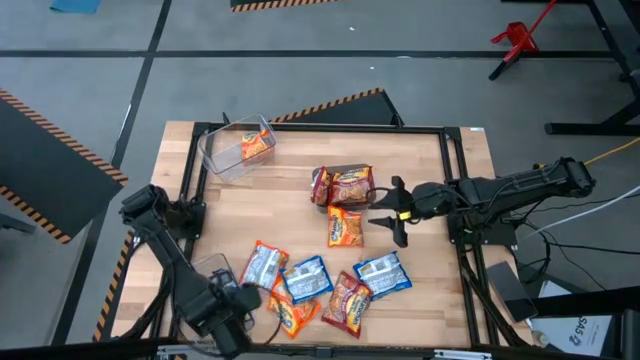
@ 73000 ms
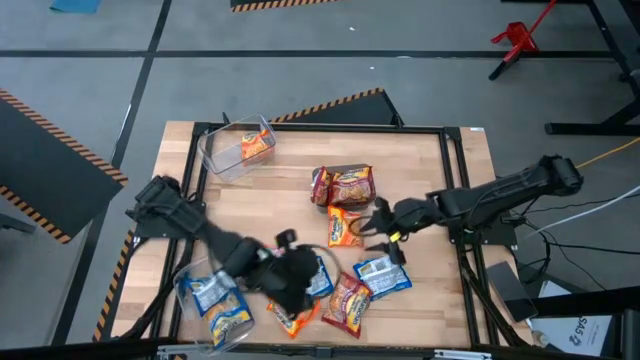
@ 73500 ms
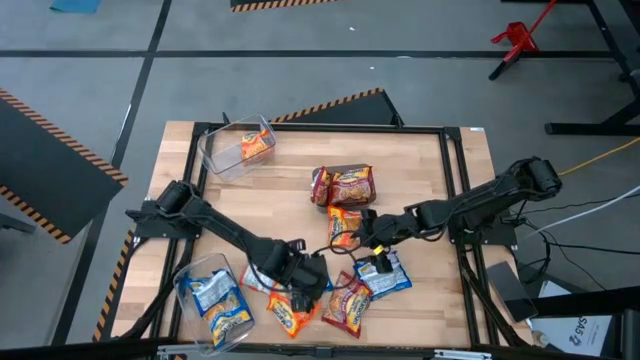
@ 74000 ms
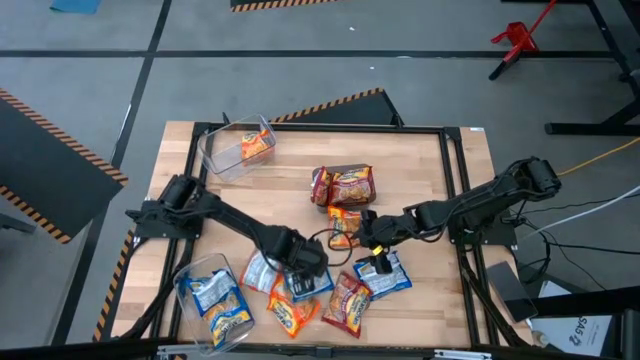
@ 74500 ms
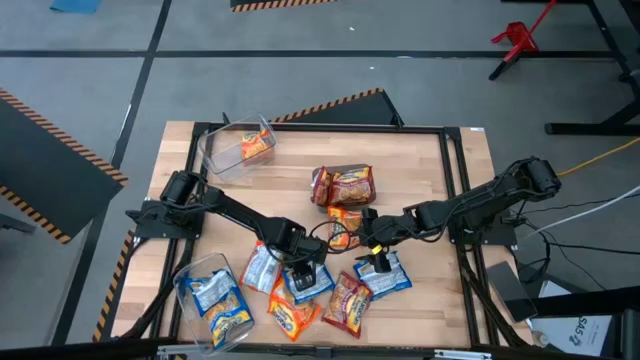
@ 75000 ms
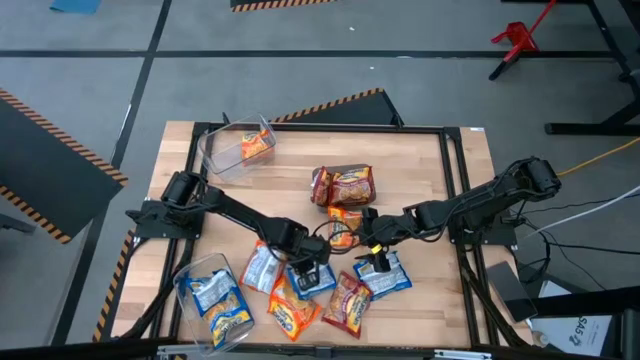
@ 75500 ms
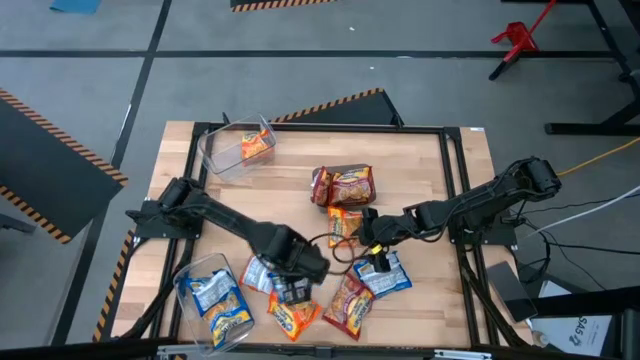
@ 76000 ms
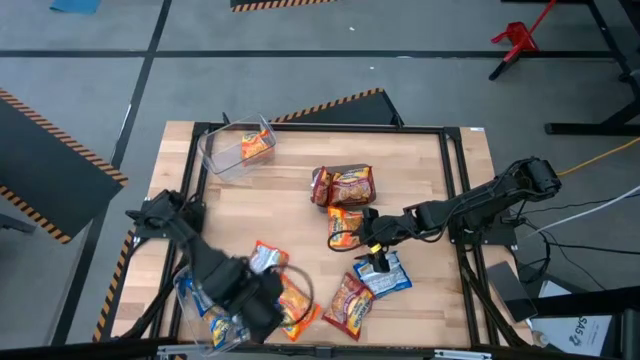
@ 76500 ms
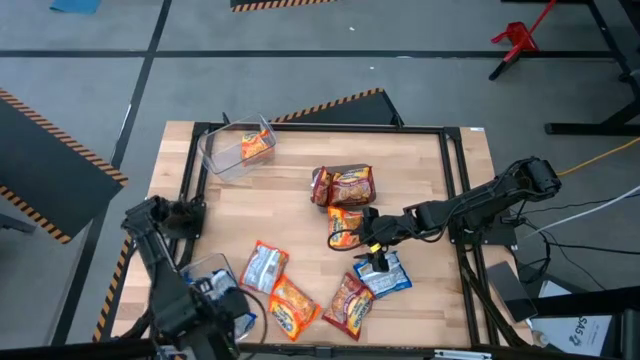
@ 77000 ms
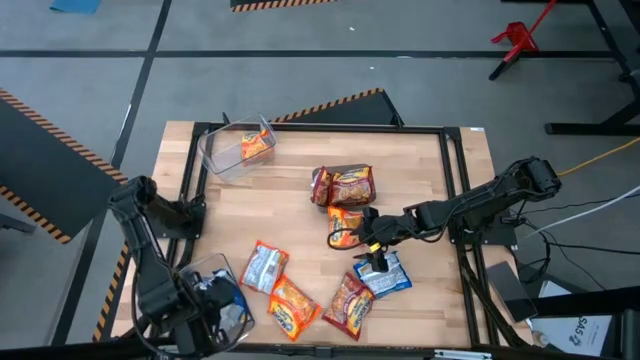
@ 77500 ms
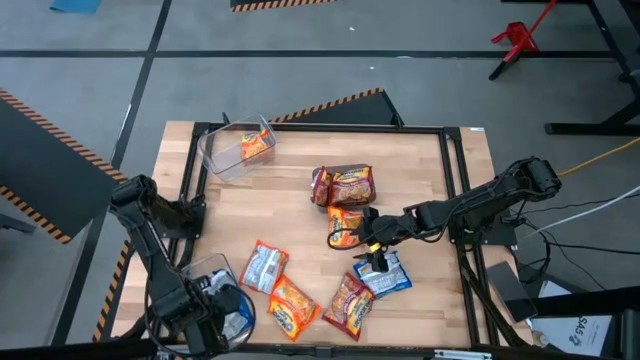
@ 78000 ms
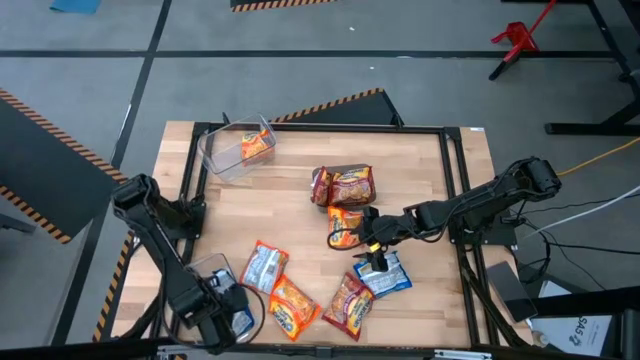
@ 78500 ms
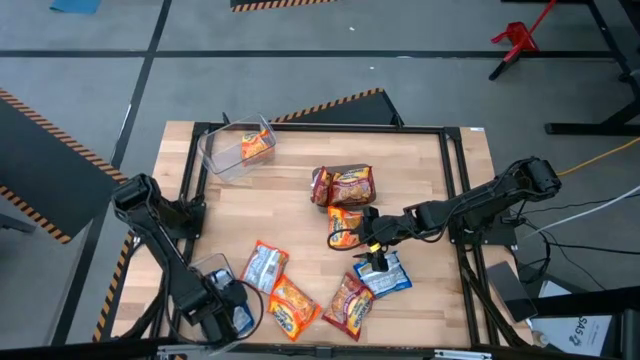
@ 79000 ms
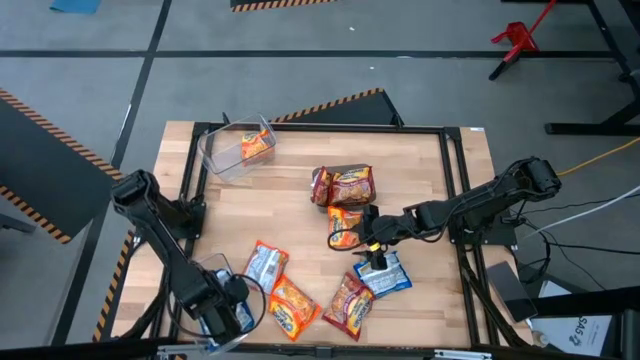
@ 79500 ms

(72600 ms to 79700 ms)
Task: Sort Maruchan noodles
Put the blue noodle pack into the bottom transparent bin

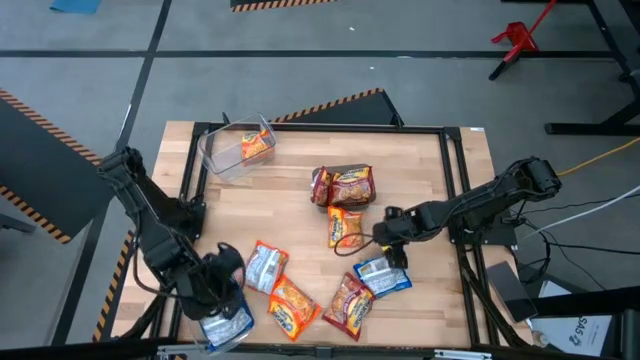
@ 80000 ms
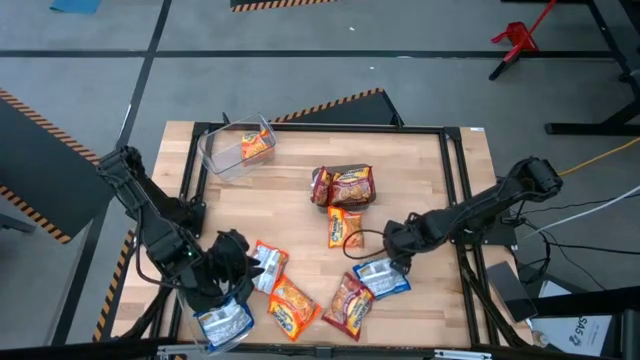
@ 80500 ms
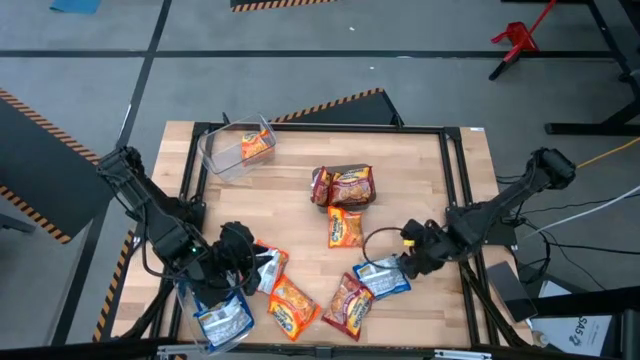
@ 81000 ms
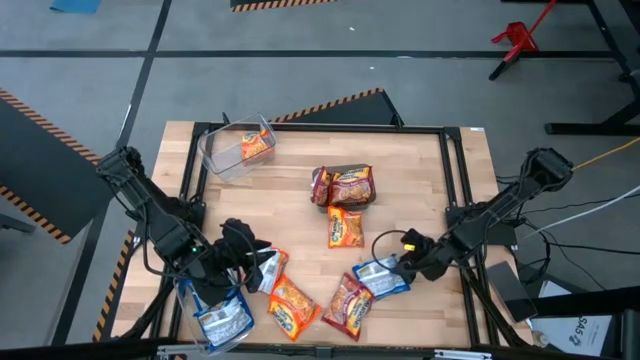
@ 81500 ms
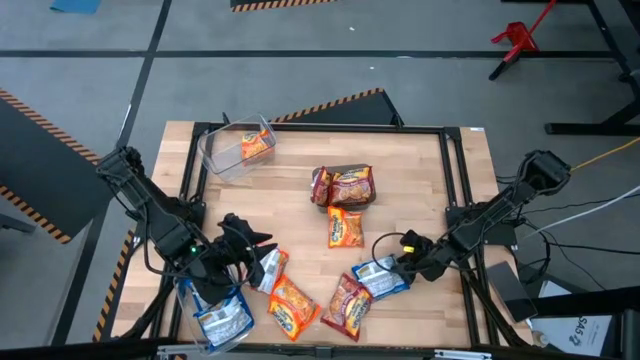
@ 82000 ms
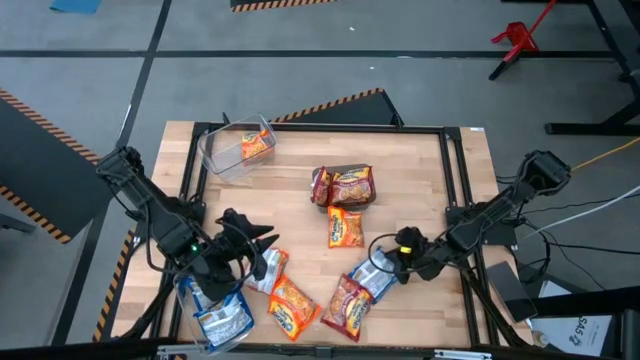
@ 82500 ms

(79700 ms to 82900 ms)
Put the blue noodle pack into the bottom transparent bin

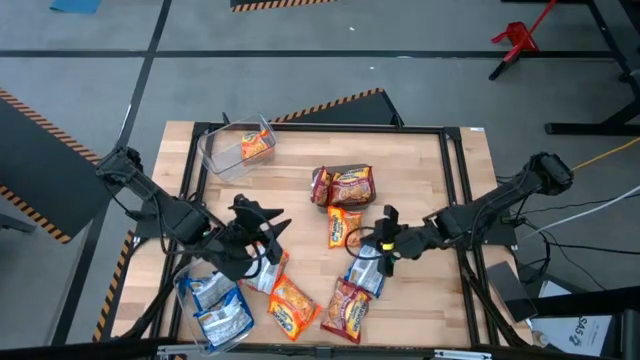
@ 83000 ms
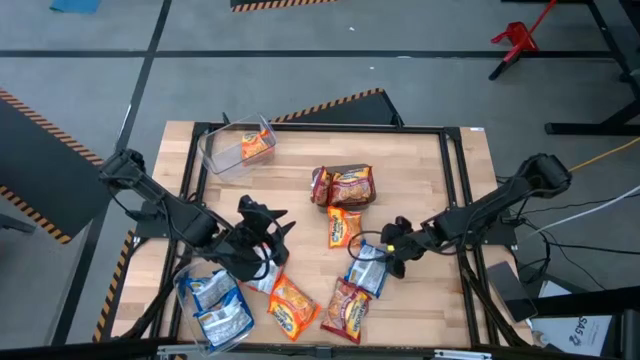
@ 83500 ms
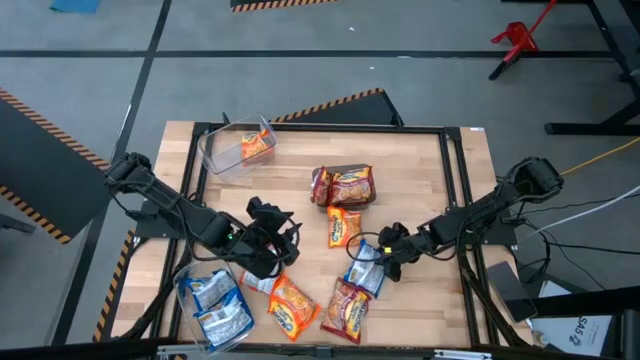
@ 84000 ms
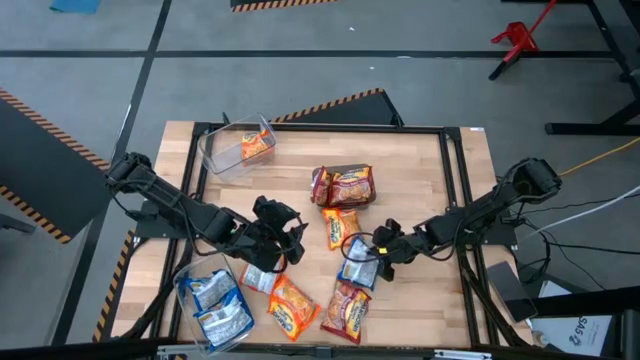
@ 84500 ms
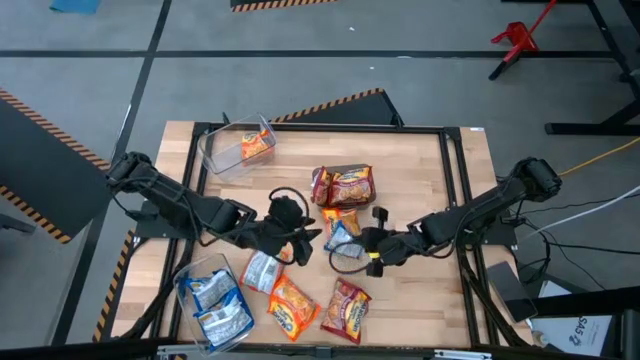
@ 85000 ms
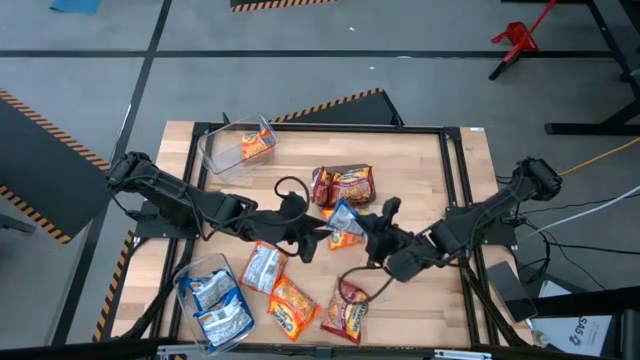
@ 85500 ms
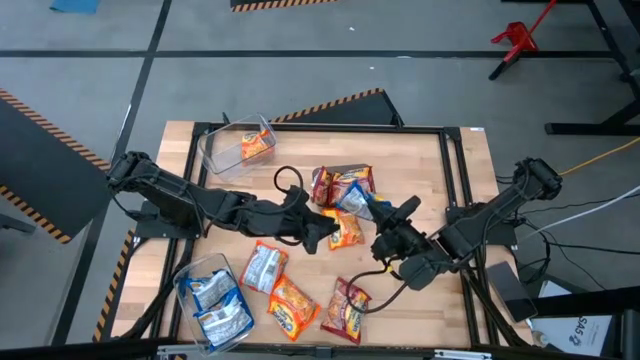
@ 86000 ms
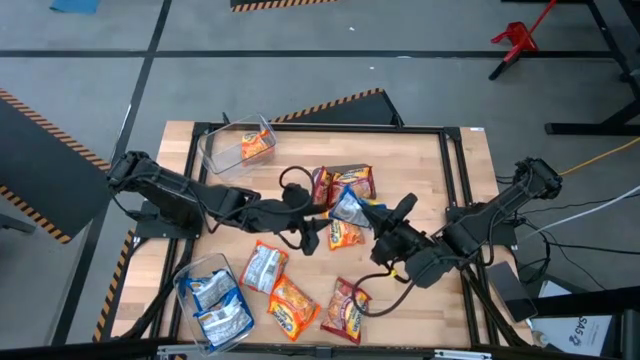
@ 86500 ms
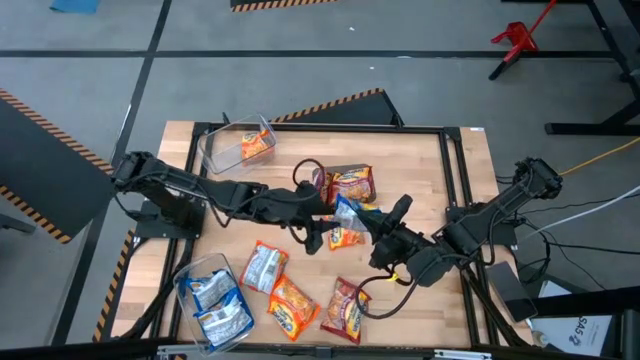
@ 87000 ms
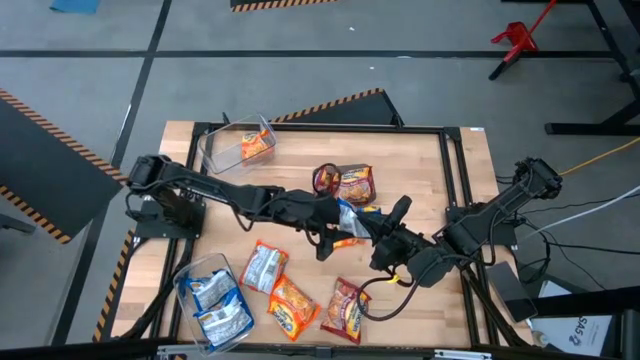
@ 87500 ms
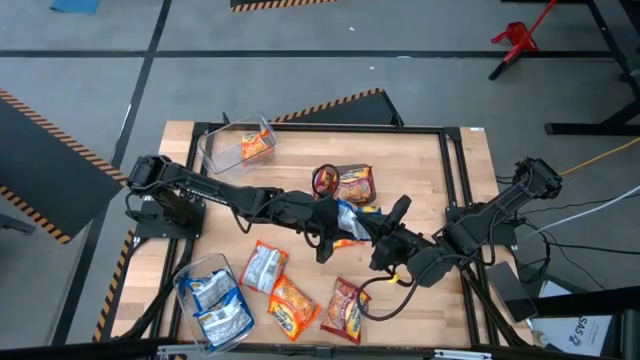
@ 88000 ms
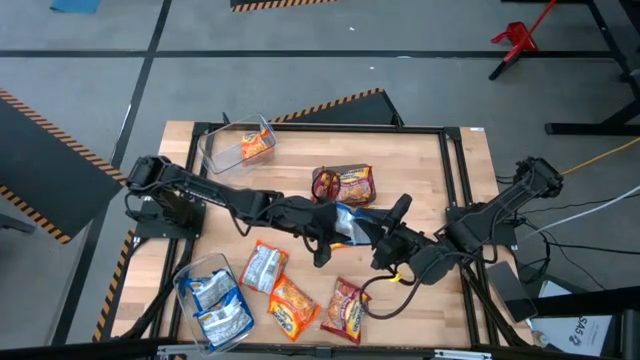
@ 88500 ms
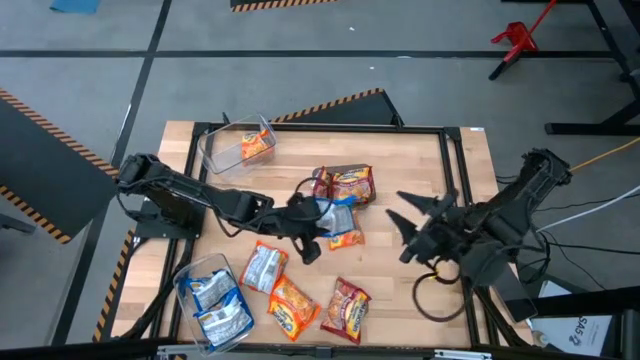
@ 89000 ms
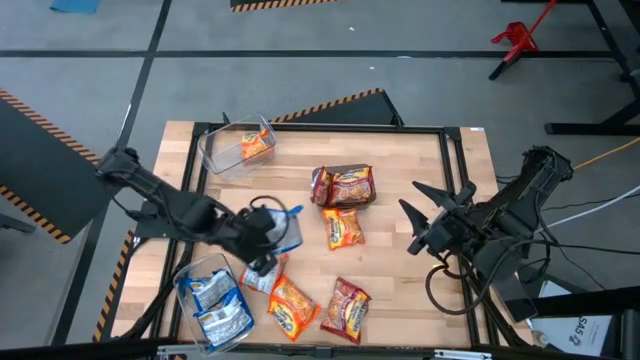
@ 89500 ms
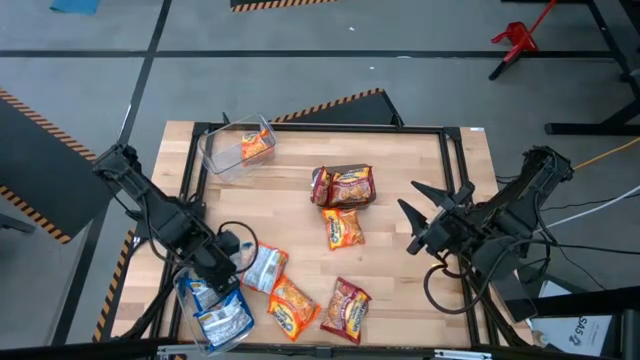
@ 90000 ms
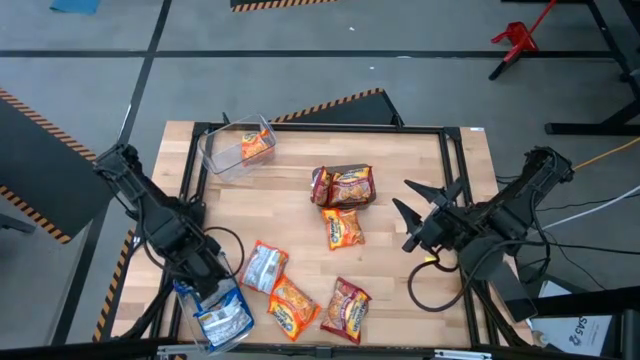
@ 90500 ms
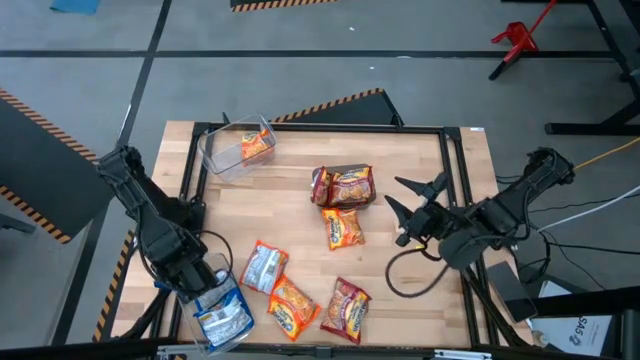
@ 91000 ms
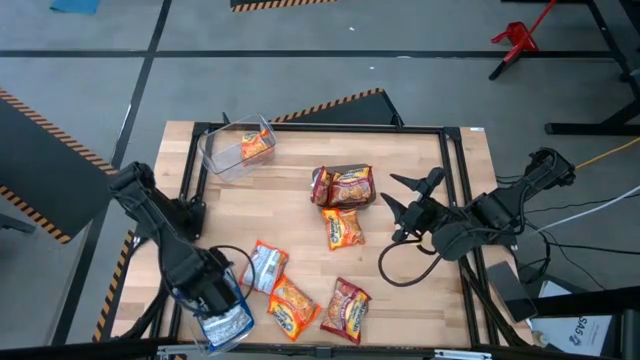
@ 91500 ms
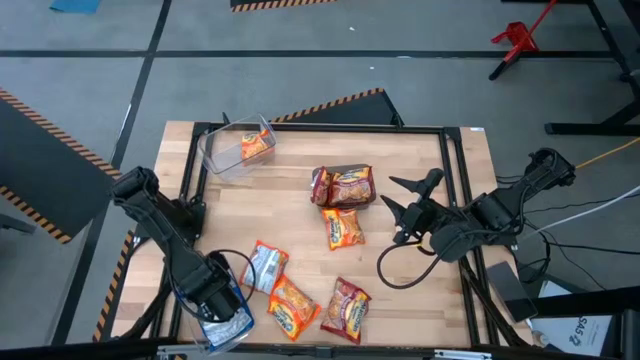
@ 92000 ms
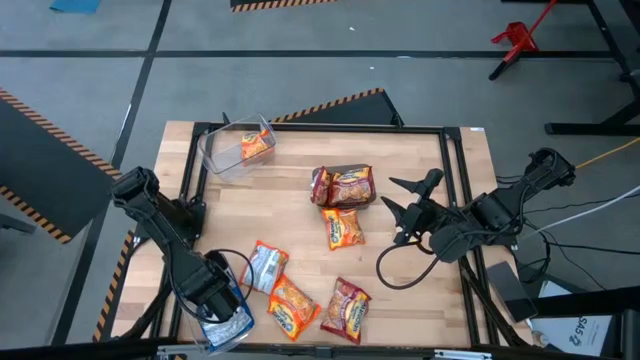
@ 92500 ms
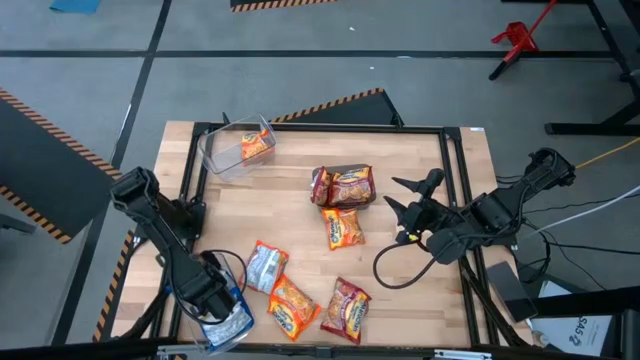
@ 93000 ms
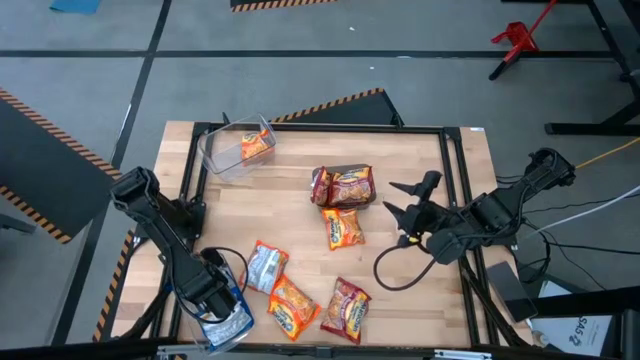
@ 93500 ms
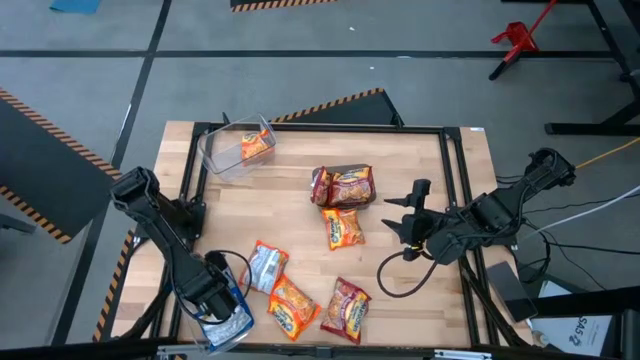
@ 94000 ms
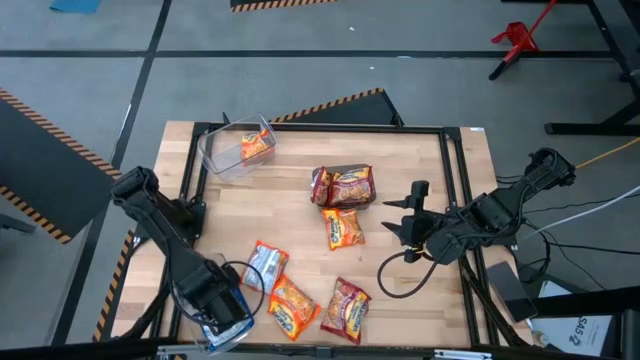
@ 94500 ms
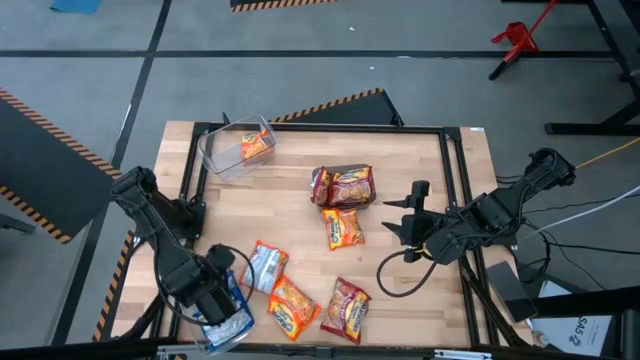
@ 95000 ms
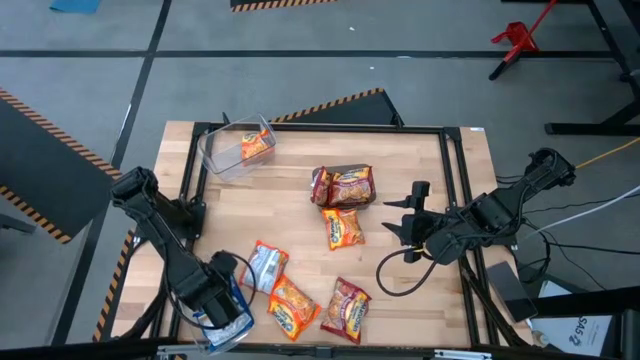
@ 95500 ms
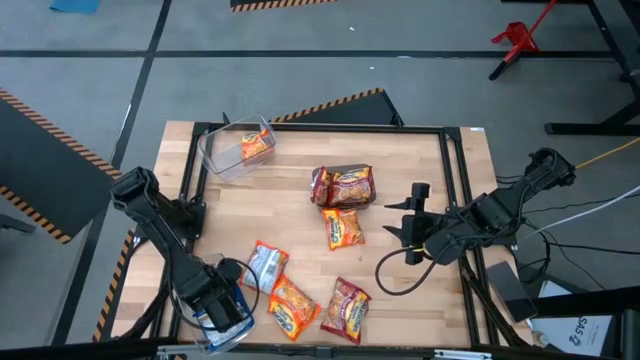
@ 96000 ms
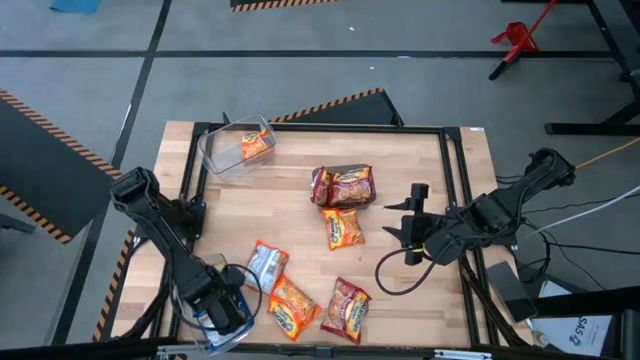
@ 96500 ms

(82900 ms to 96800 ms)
Put the blue noodle pack into the bottom transparent bin
